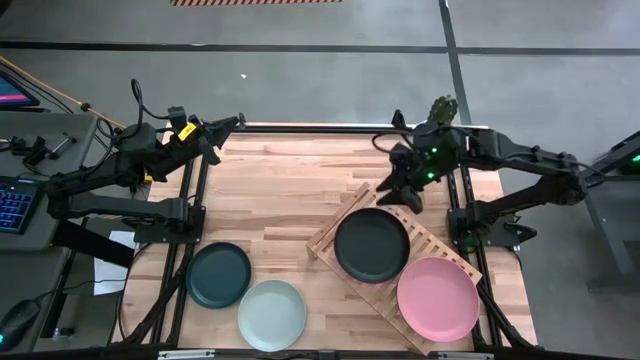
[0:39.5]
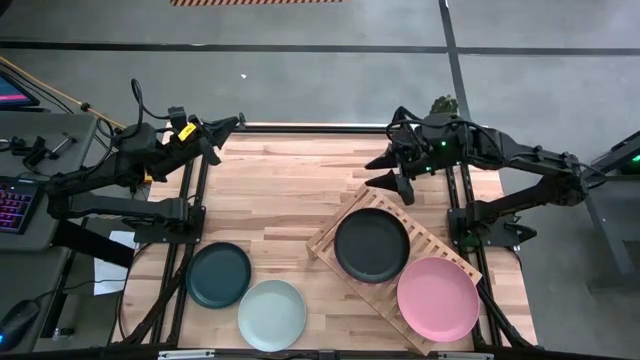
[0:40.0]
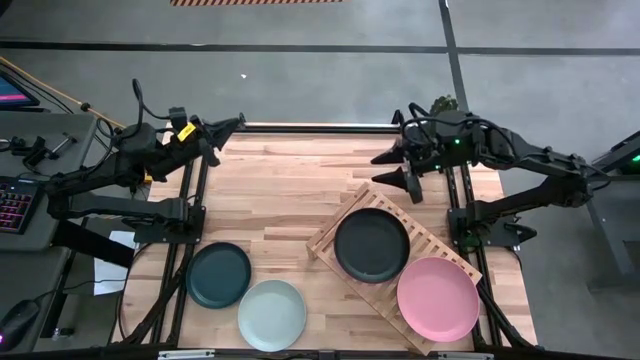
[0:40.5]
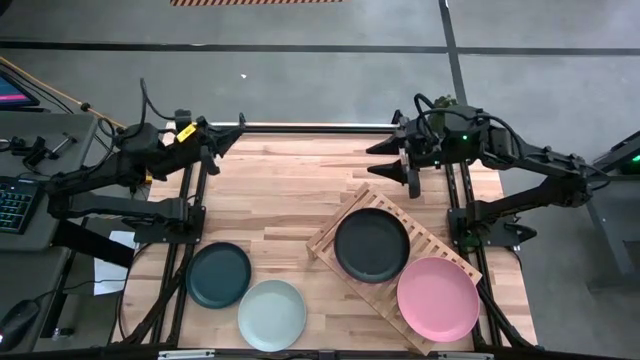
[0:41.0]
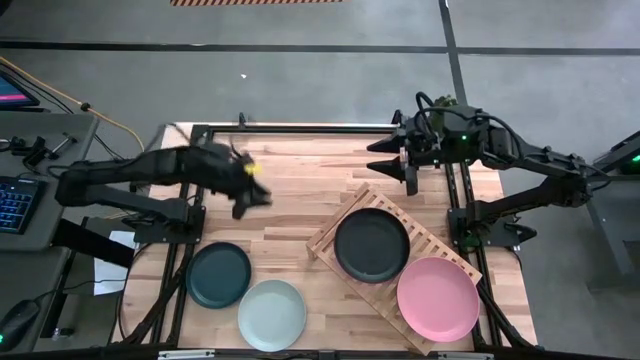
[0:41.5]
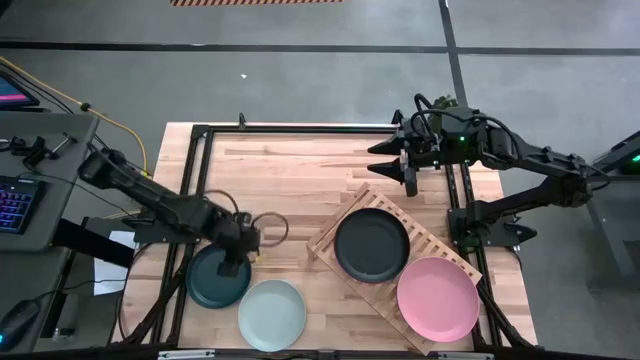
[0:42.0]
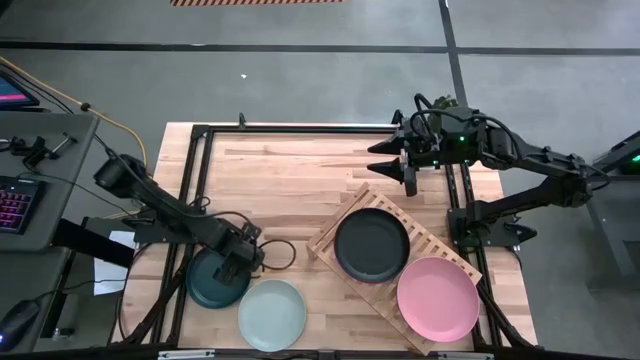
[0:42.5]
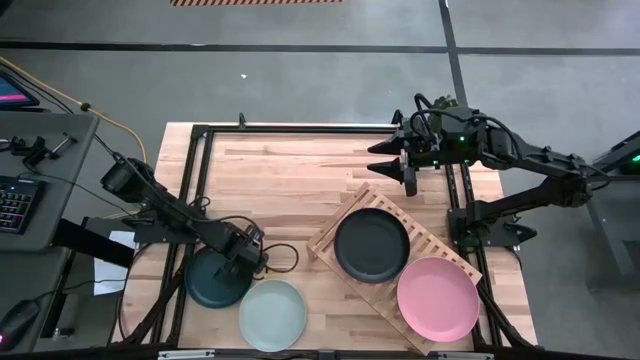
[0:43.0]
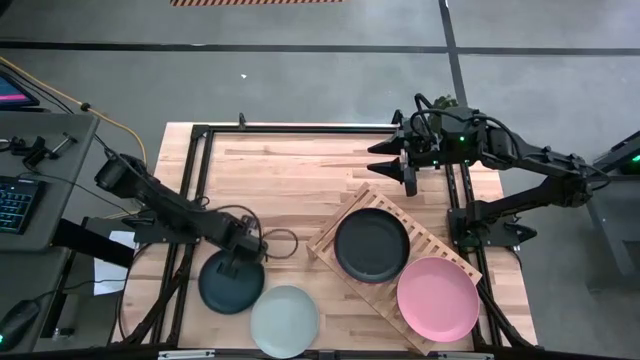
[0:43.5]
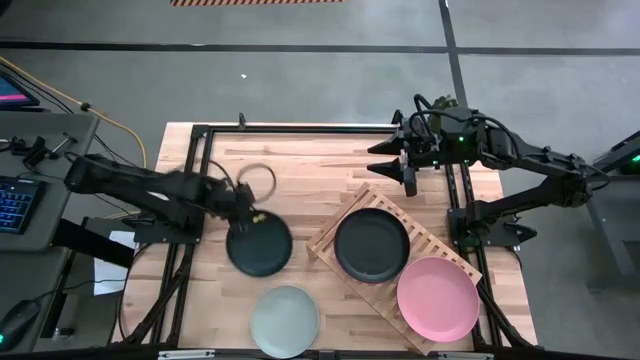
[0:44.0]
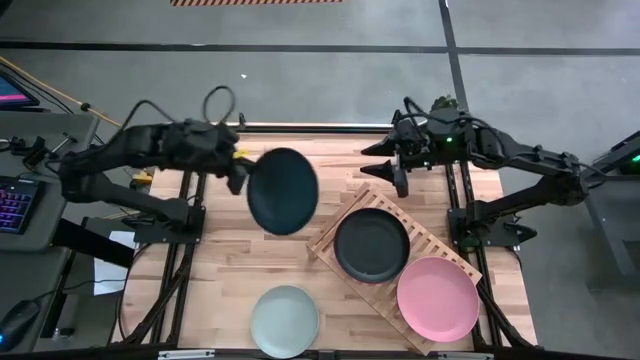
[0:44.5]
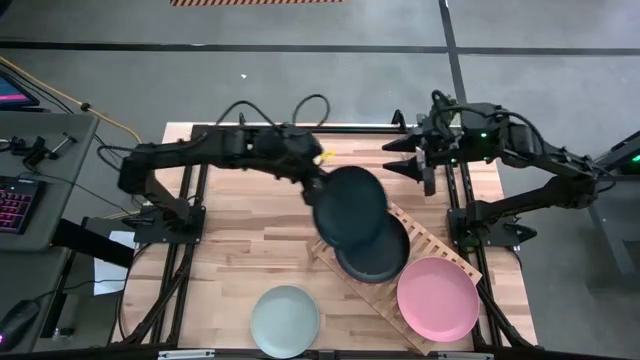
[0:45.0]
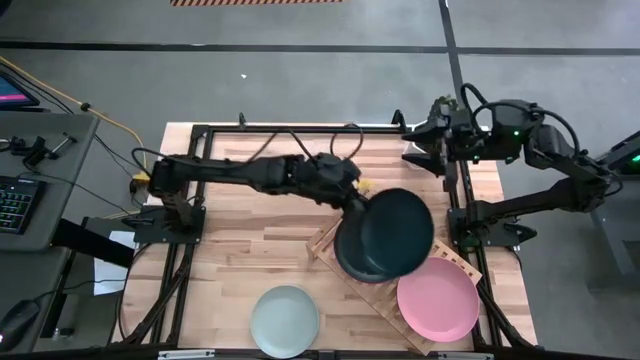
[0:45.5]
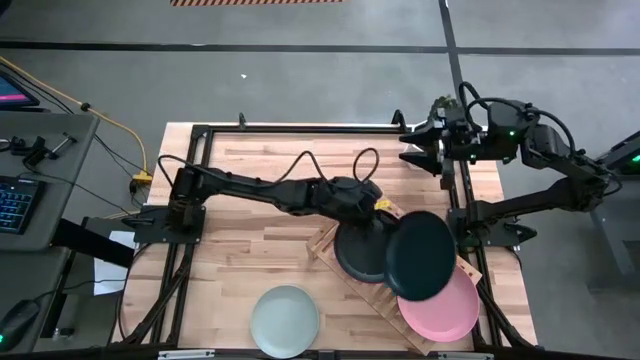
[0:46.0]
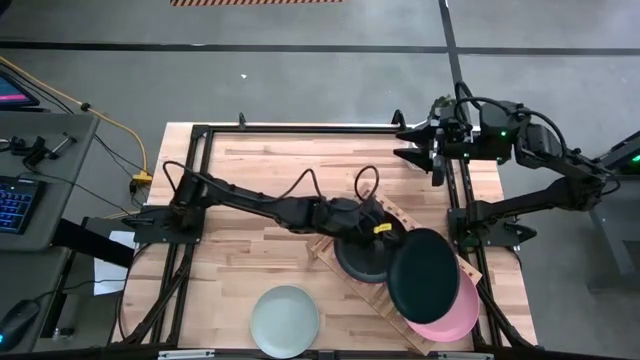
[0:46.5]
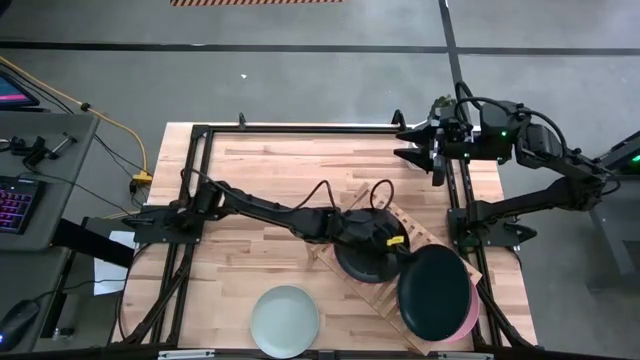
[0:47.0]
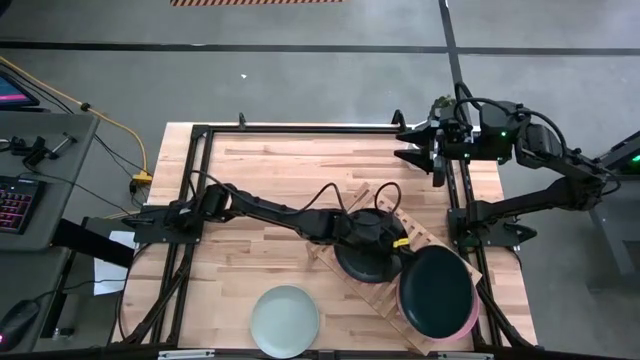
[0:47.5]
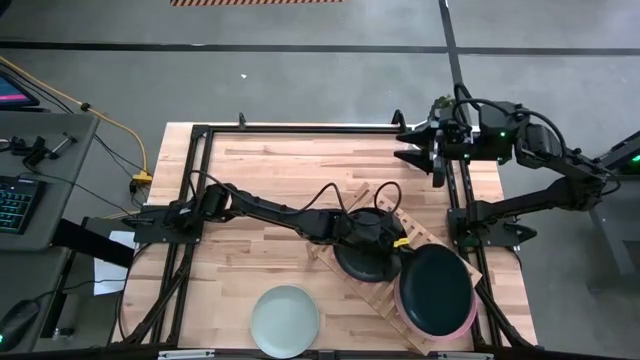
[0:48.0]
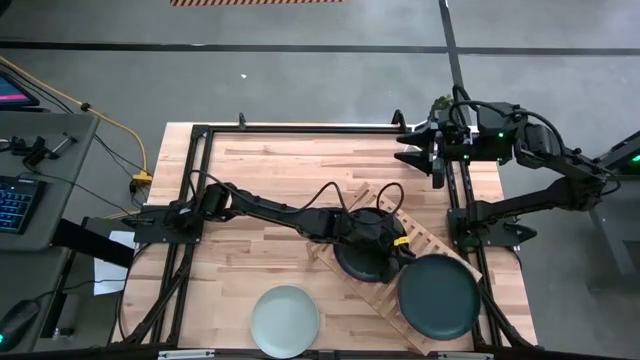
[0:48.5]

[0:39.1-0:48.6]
Task: Place and stack plates onto a shelf
Stack the dark green plate on top of the light pink plate on the shelf

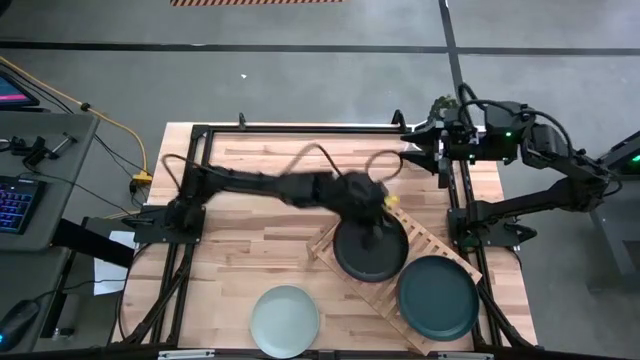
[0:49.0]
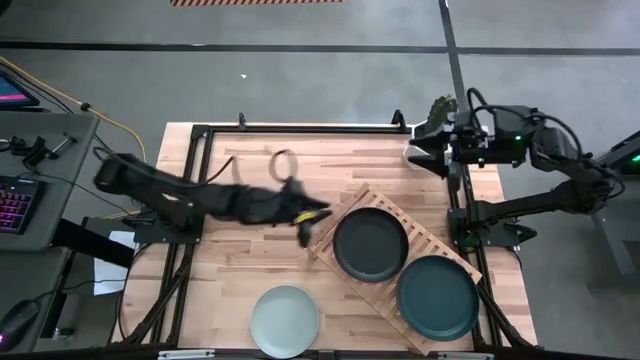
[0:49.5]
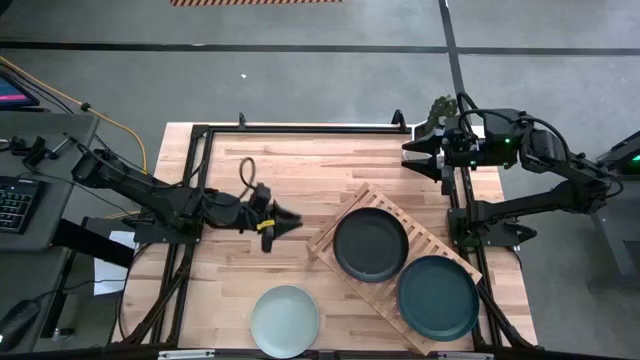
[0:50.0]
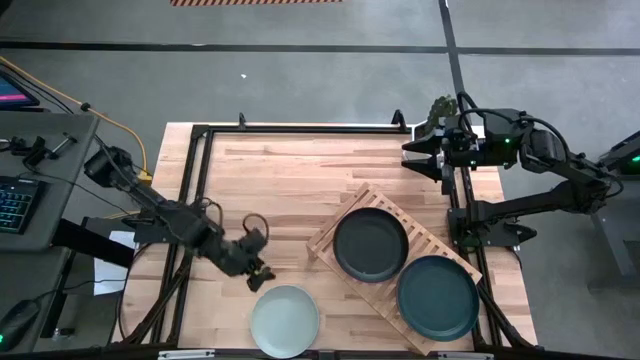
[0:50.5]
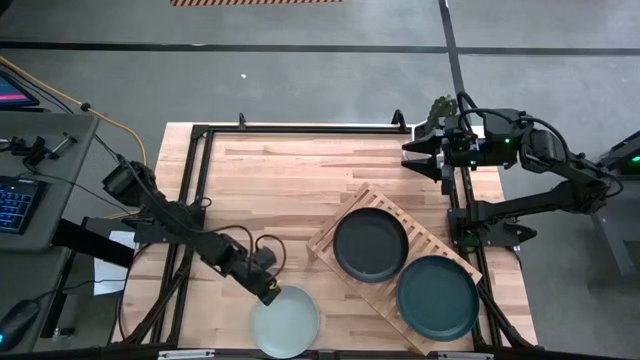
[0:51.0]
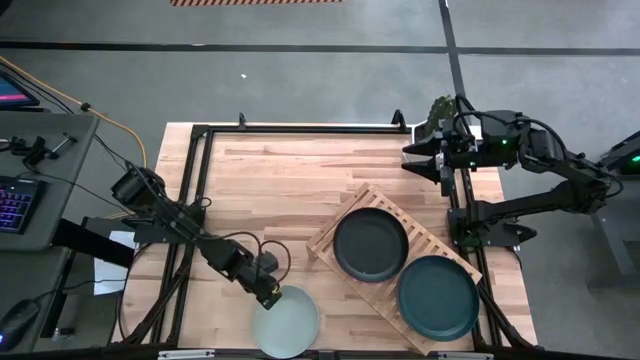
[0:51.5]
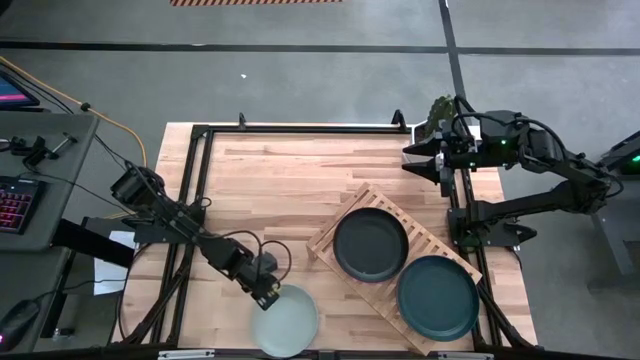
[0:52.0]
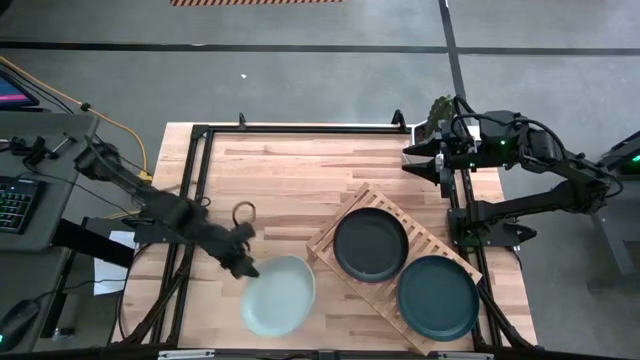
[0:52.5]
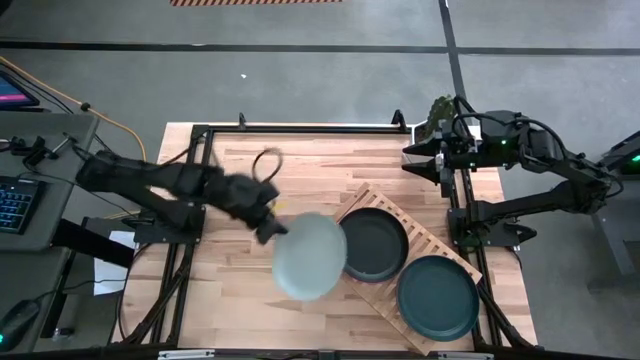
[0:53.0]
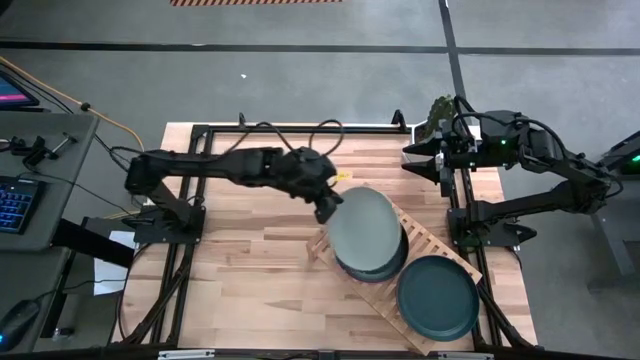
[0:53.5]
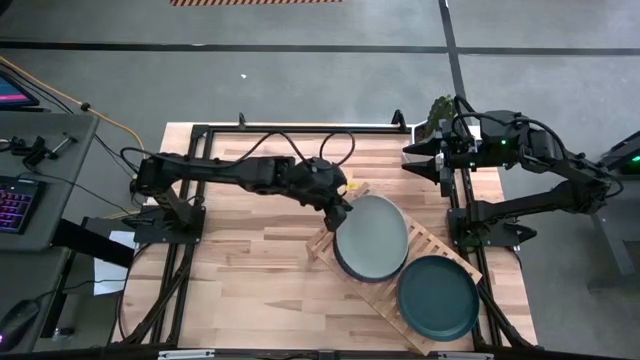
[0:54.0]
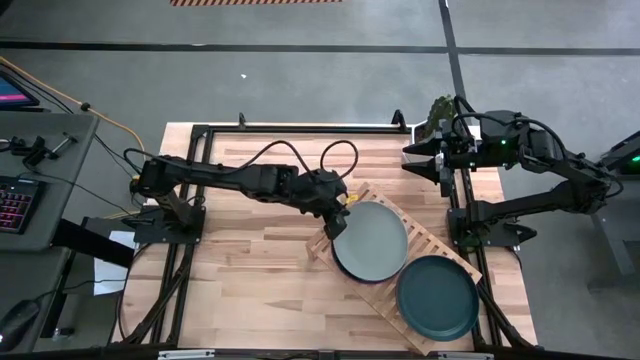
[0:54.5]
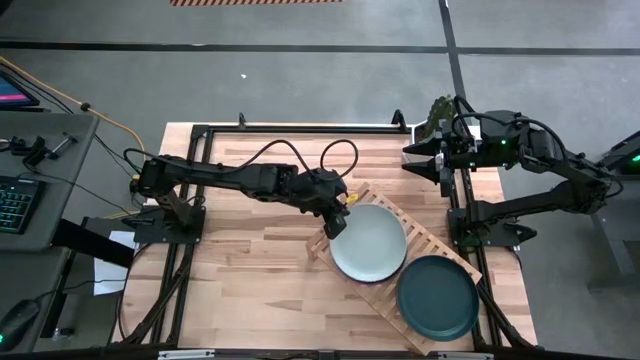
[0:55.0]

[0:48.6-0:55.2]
Stack the white plate on top of the black plate on the shelf

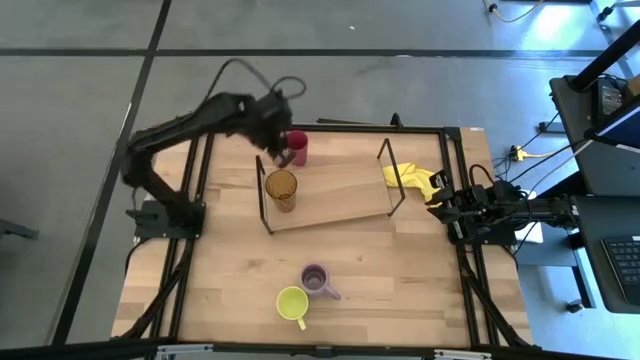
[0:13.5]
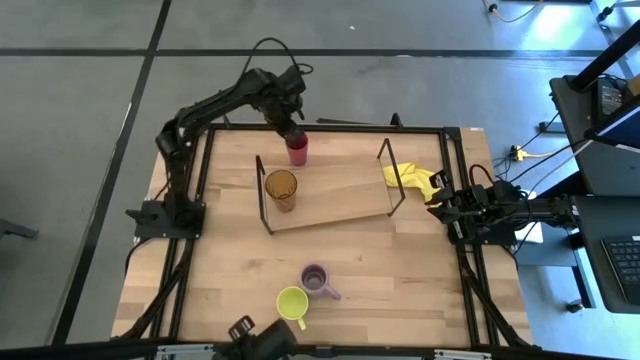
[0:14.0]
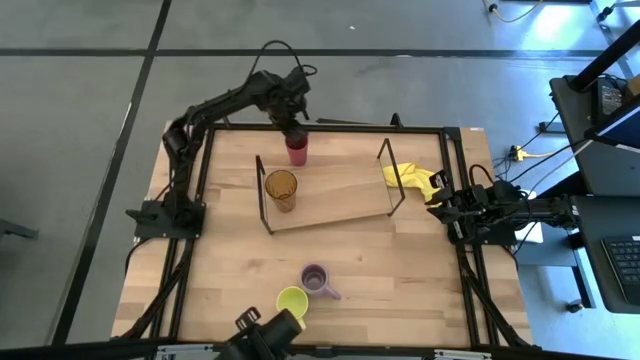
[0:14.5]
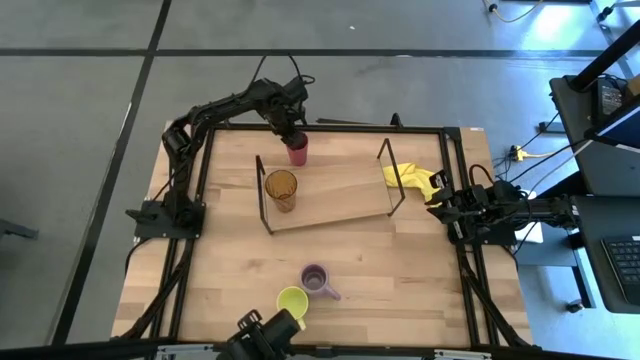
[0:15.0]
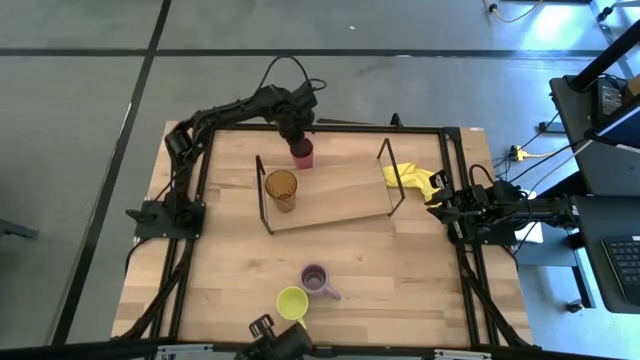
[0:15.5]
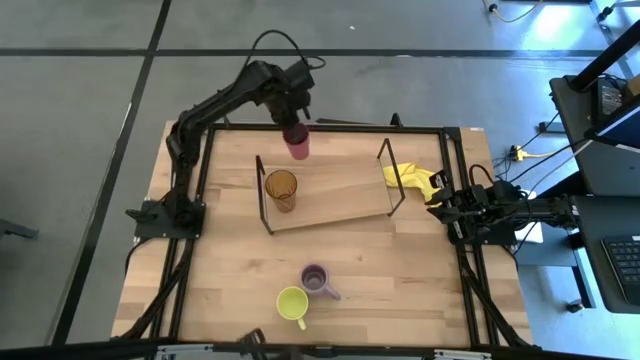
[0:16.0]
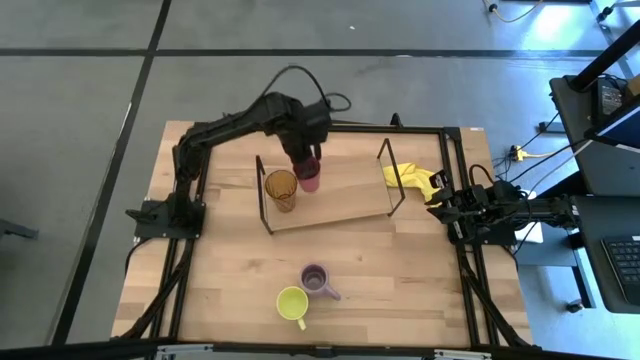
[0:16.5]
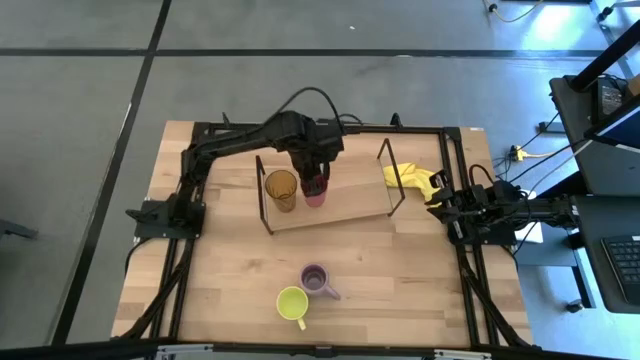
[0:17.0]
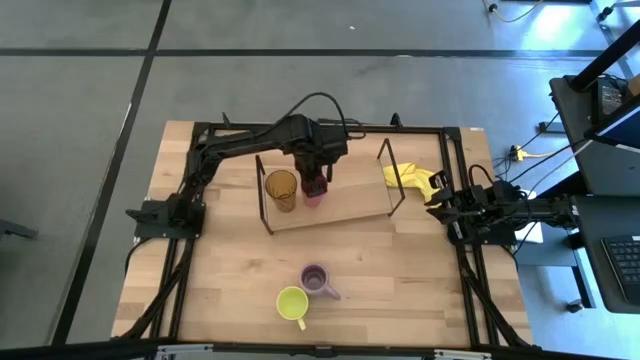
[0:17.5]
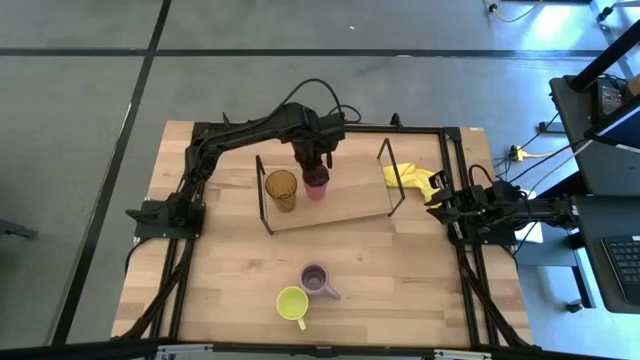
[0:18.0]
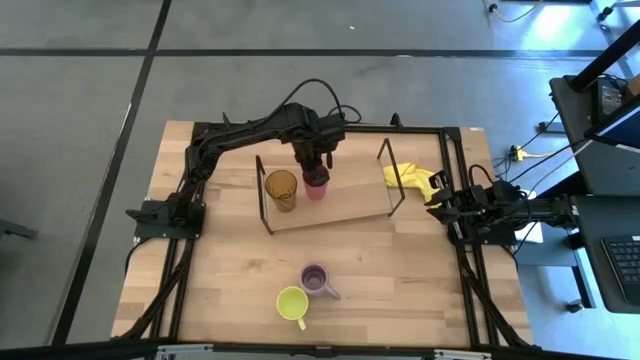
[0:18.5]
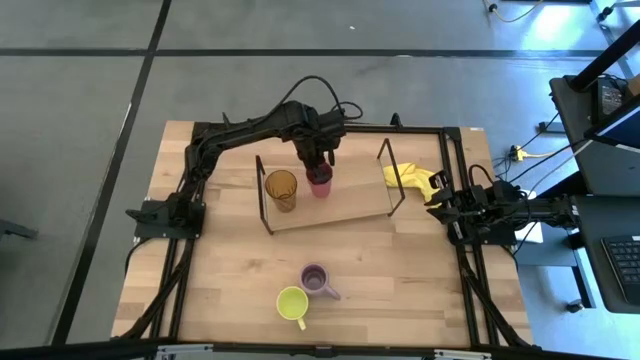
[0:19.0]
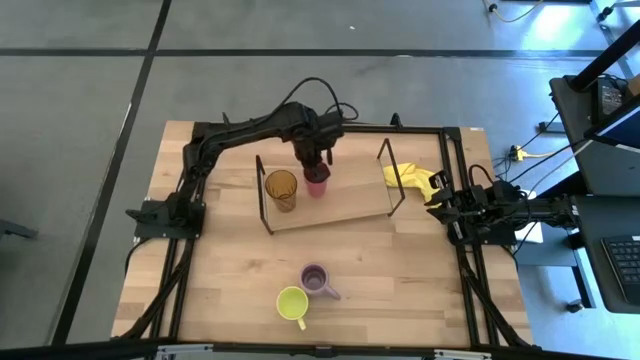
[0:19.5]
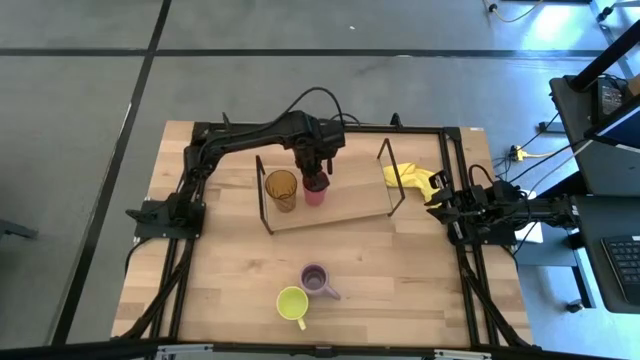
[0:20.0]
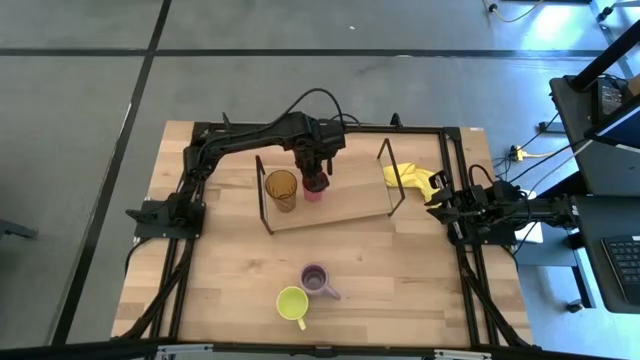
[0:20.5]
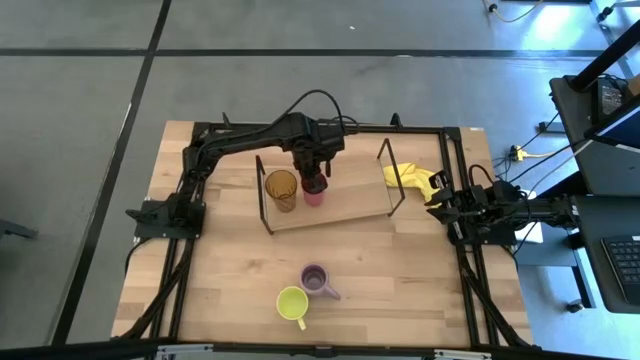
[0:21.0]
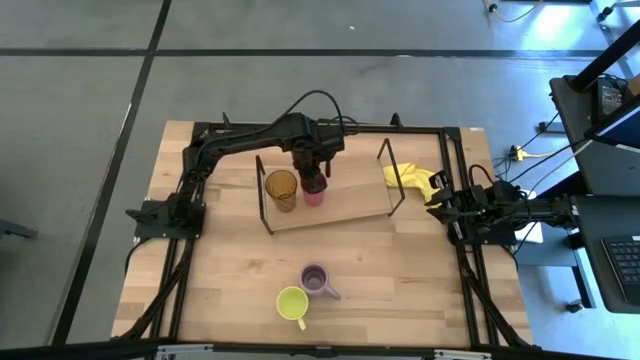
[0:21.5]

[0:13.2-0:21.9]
Task: Stack small to large cups/mugs on shelf
Put the pink cup on the shelf
